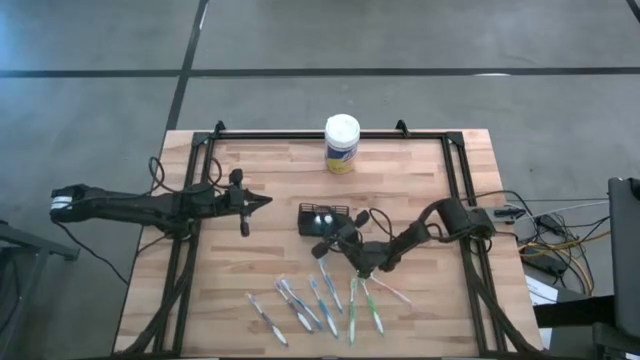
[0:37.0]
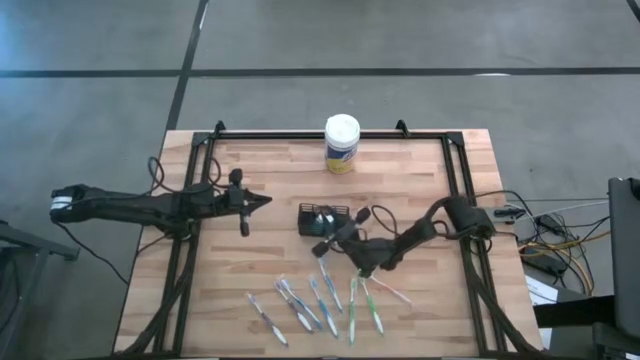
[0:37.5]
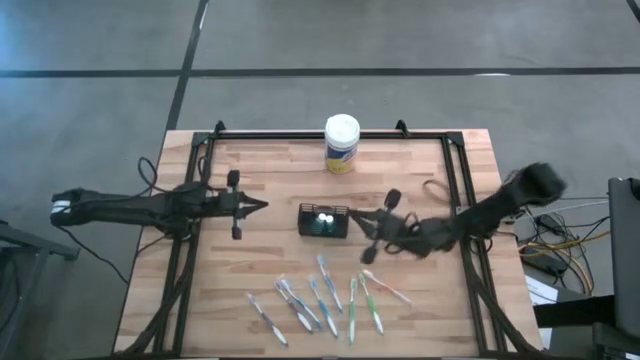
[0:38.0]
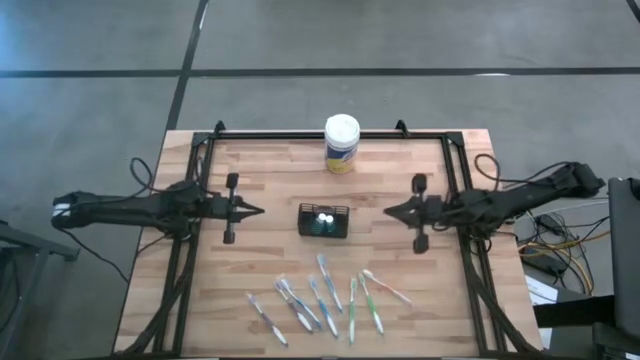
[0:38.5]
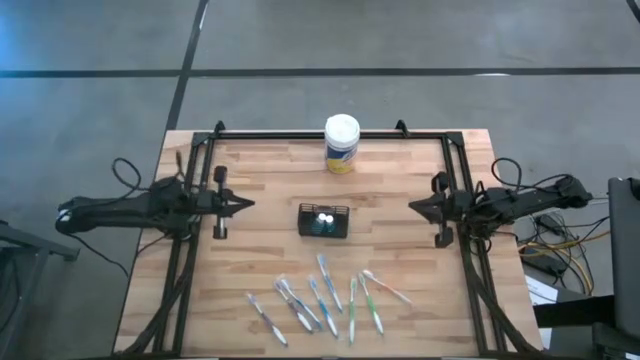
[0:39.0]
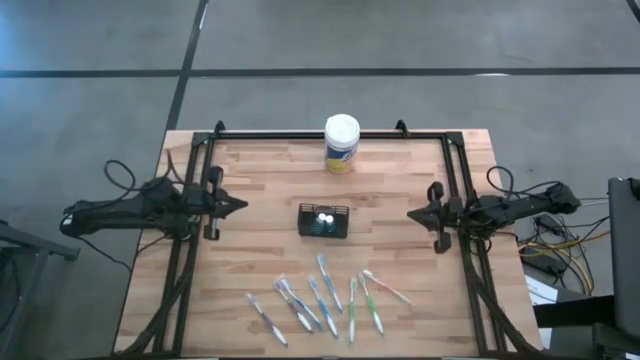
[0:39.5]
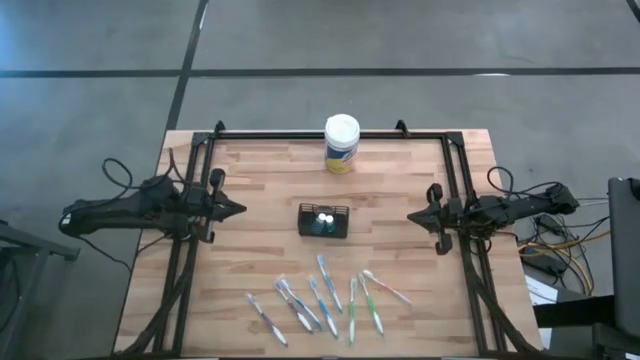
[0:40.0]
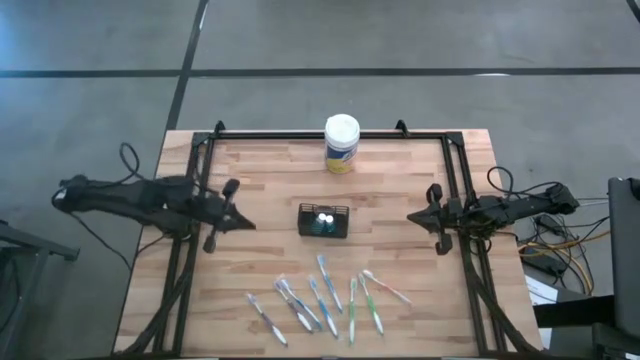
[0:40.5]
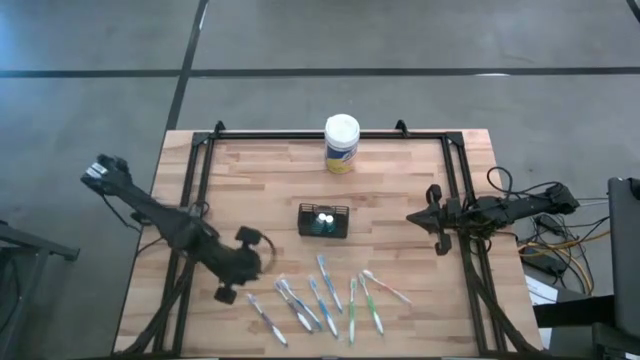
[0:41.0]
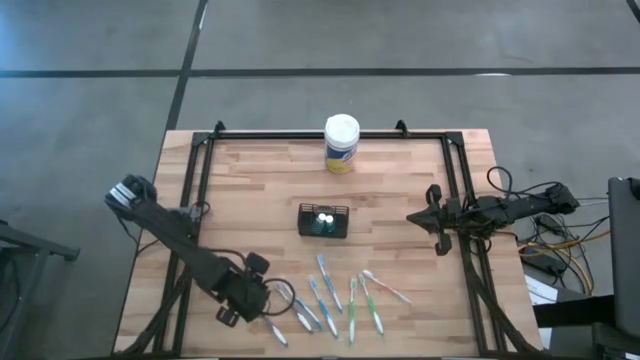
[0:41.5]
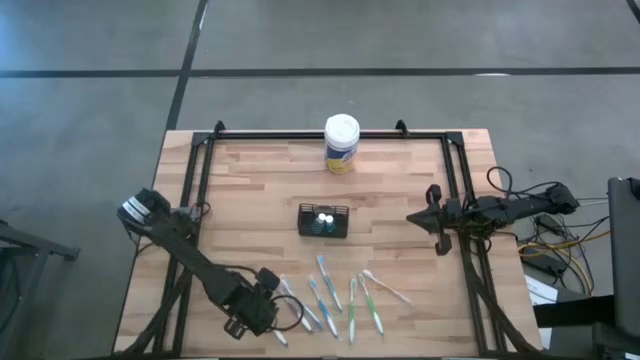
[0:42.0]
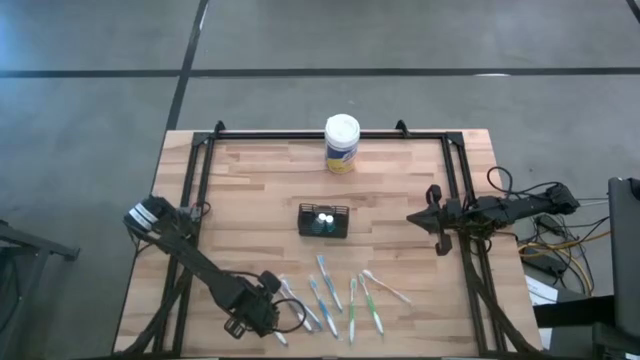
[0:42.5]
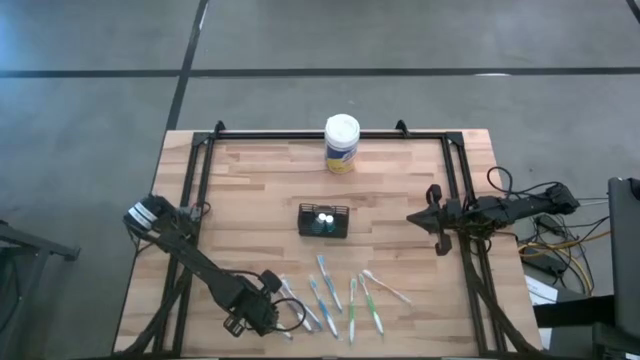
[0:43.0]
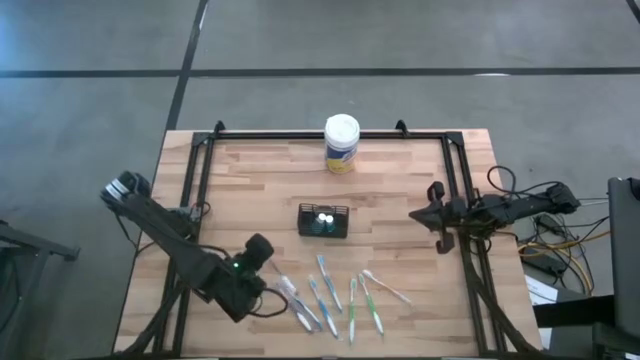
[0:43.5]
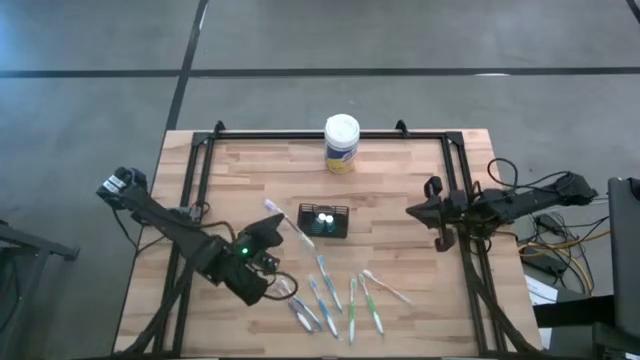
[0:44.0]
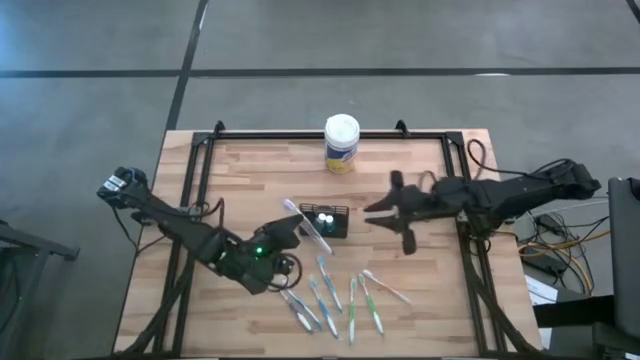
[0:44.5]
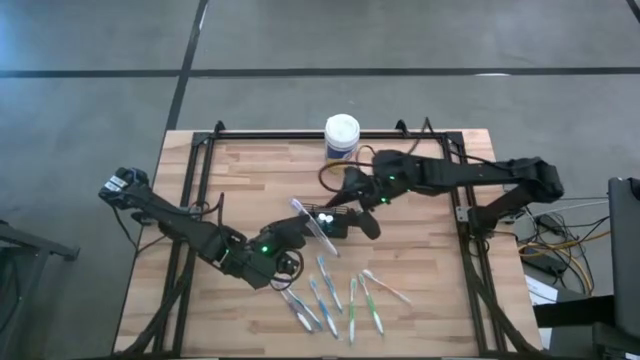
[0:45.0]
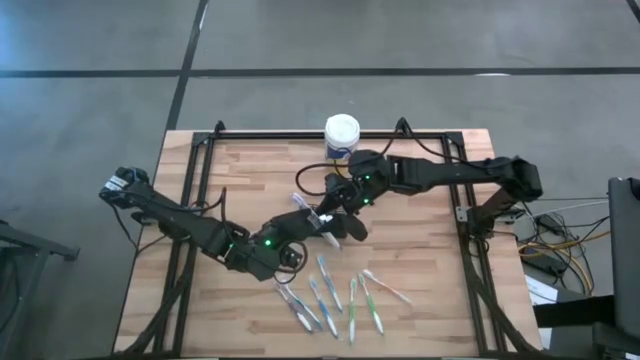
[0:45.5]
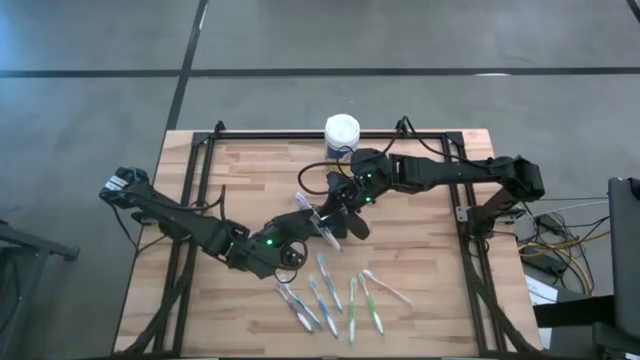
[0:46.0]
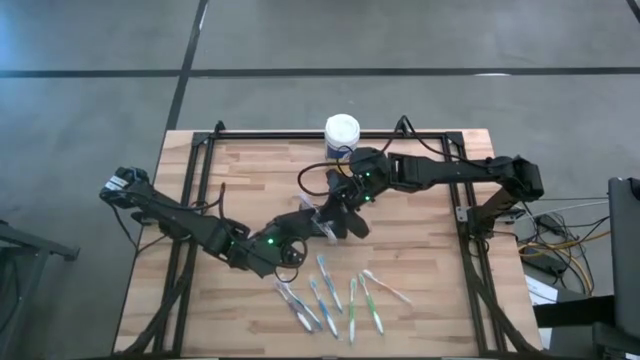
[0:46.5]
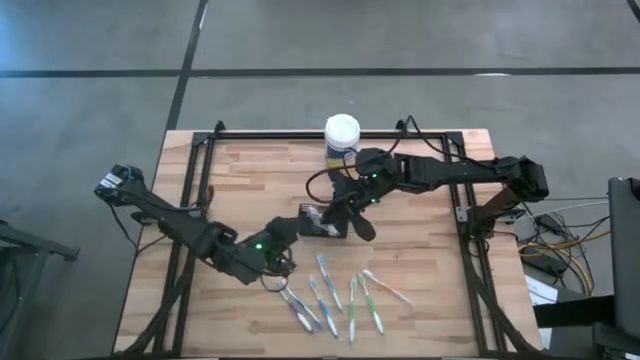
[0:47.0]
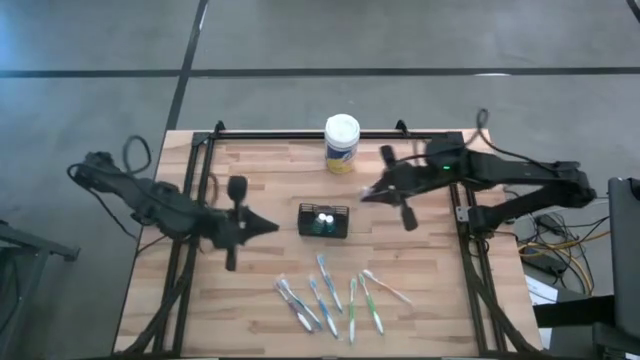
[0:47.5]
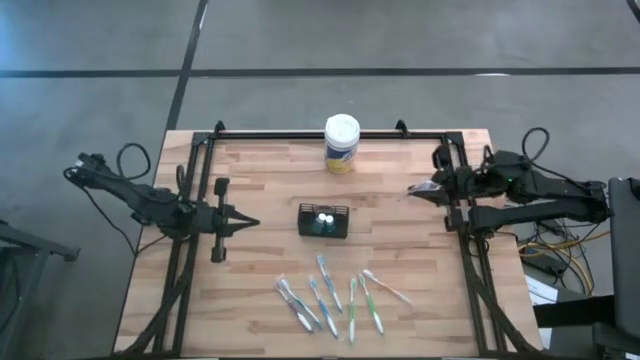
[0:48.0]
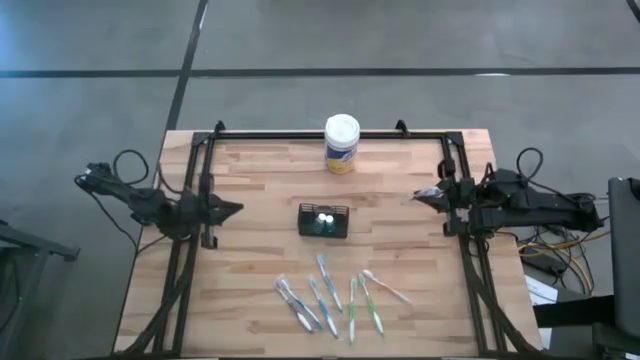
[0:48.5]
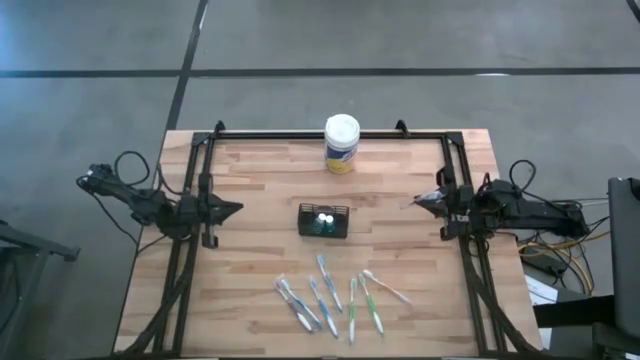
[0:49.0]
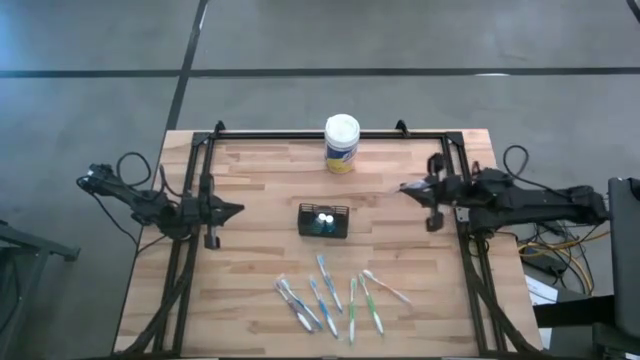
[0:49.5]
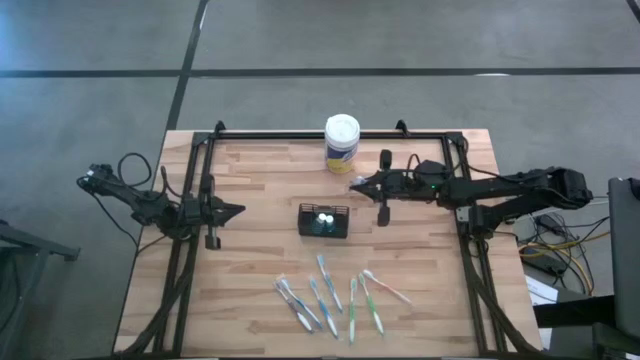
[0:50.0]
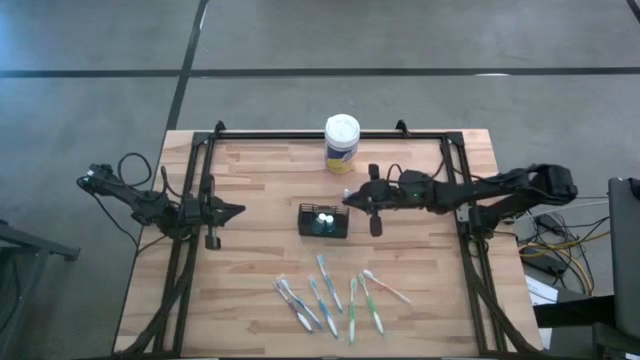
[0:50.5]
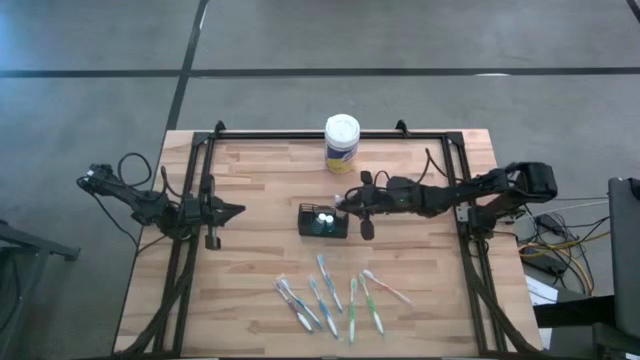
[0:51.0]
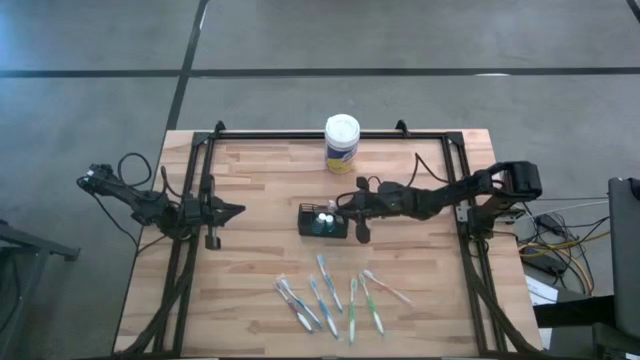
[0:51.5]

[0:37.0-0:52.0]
Task: Pick & Place toothbrushing station
Put the left purple toothbrush into the wire organizer

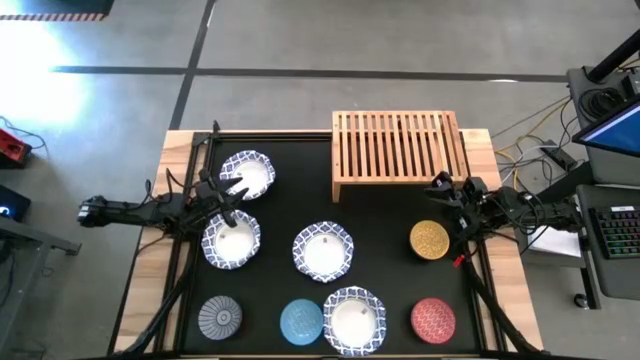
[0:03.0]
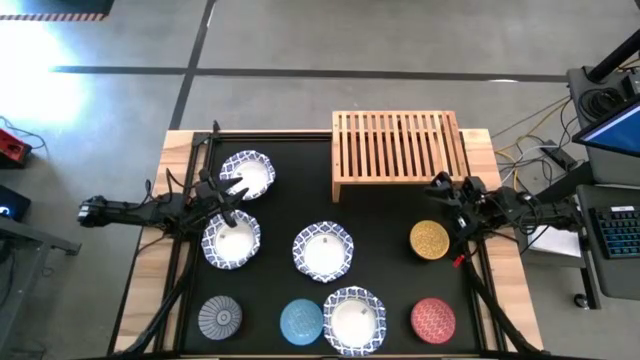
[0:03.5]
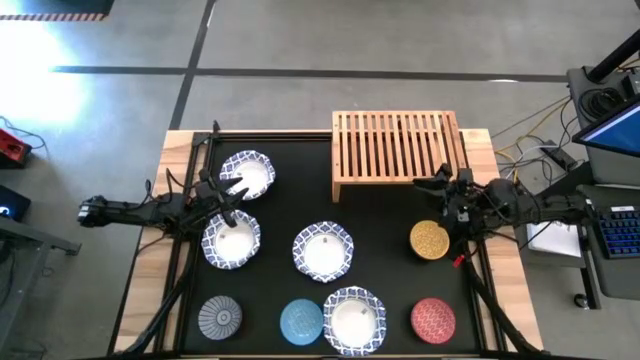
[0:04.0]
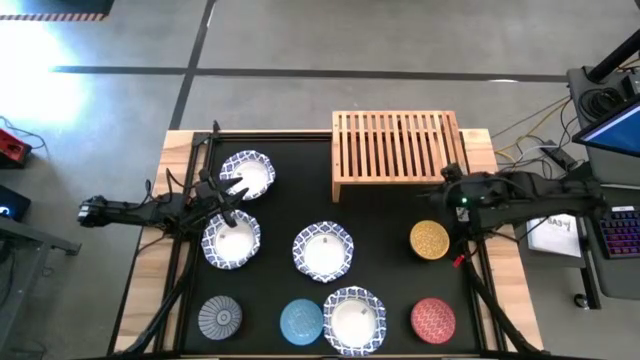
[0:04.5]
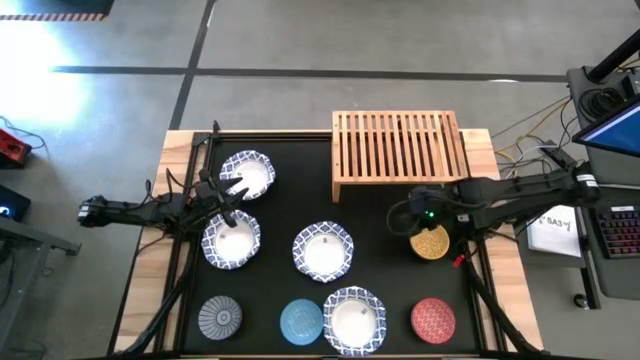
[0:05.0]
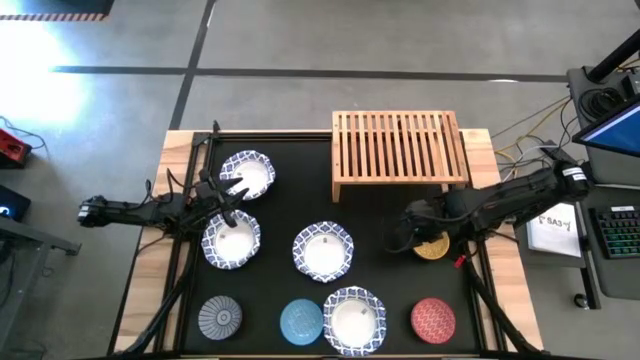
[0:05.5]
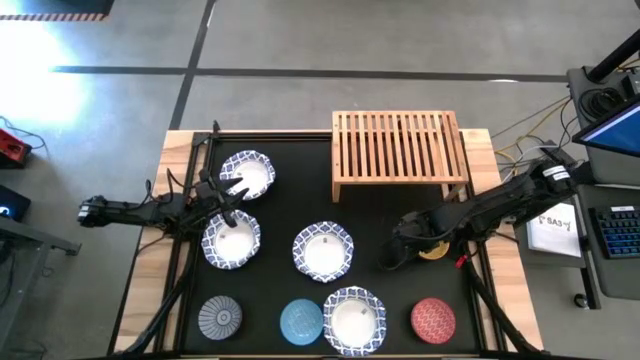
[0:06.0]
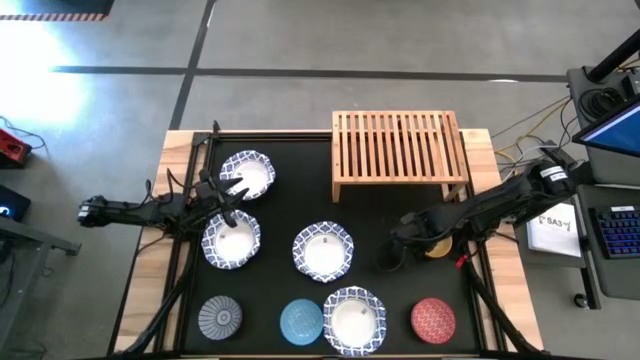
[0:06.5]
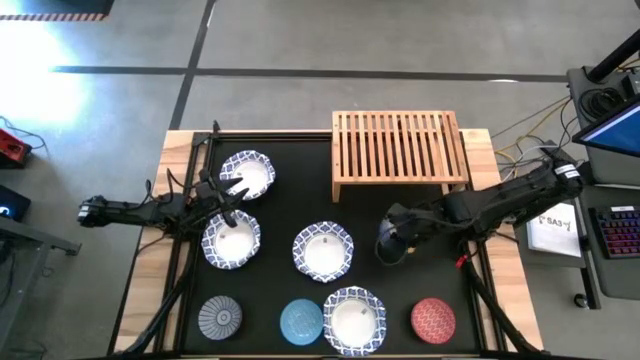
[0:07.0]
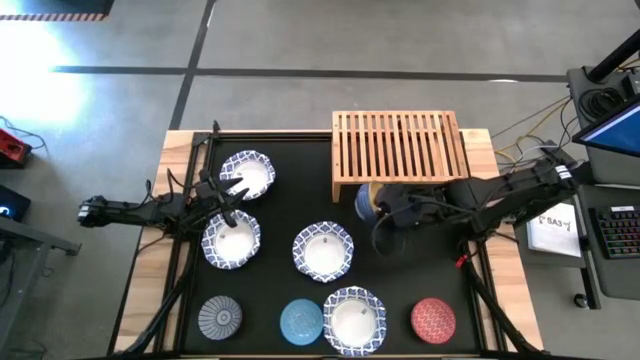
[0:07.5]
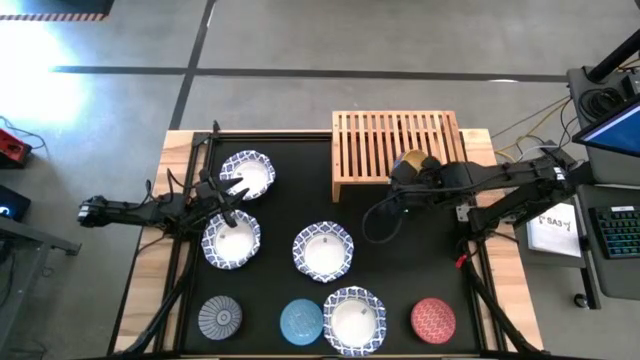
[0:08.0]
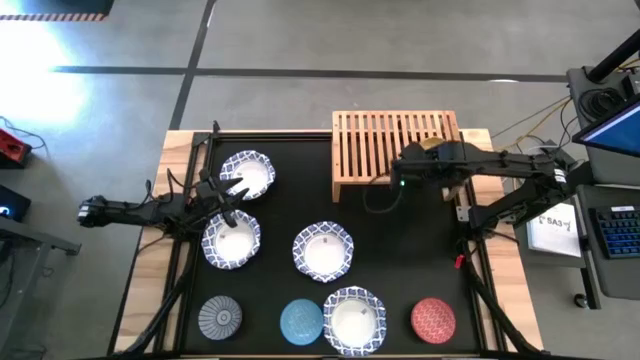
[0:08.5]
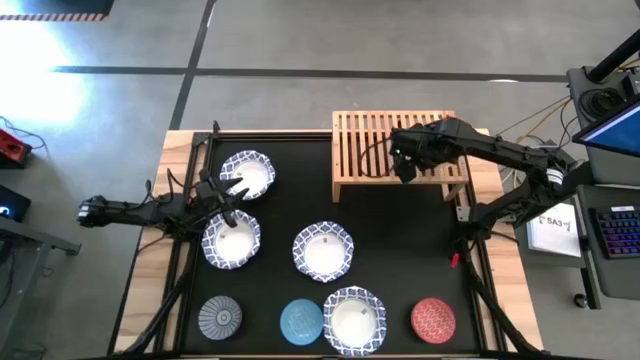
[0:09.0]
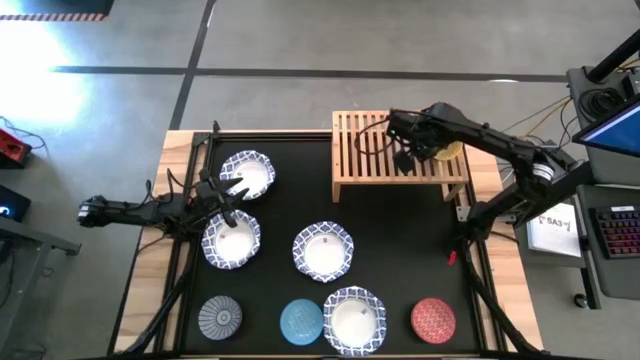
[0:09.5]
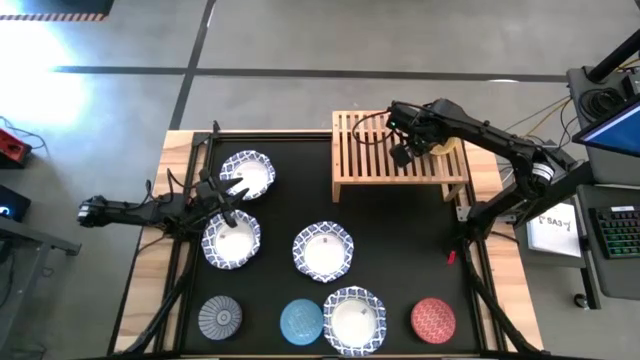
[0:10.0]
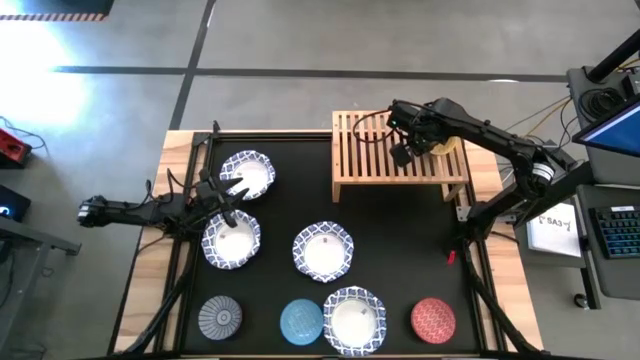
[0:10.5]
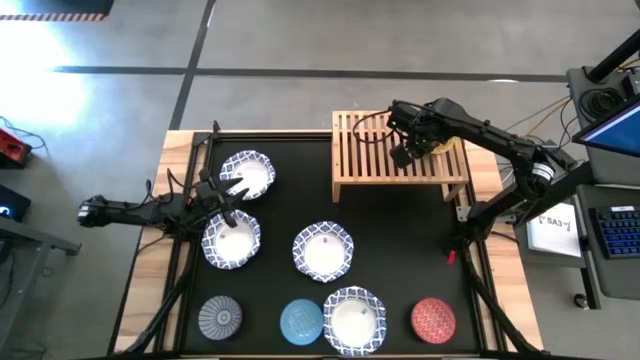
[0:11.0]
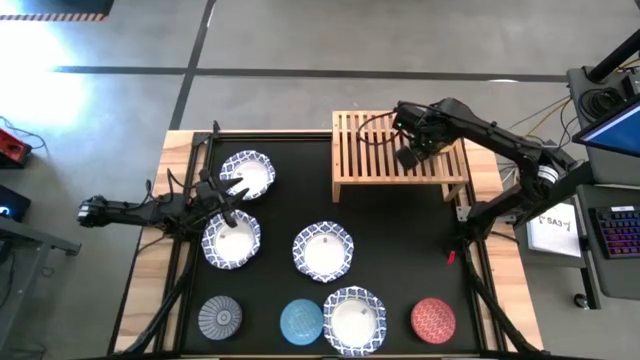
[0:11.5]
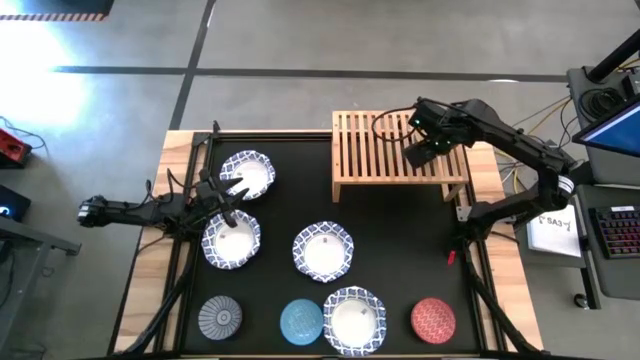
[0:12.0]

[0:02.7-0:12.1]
Task: Place and stack bowls onto a shelf
Put the yellow bowl on the shelf
